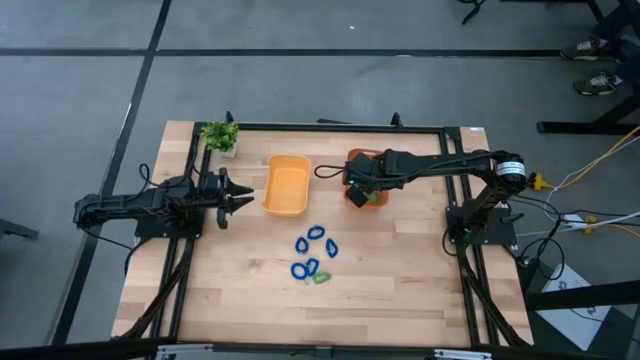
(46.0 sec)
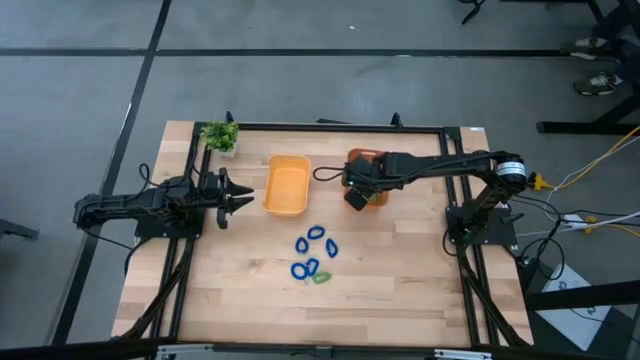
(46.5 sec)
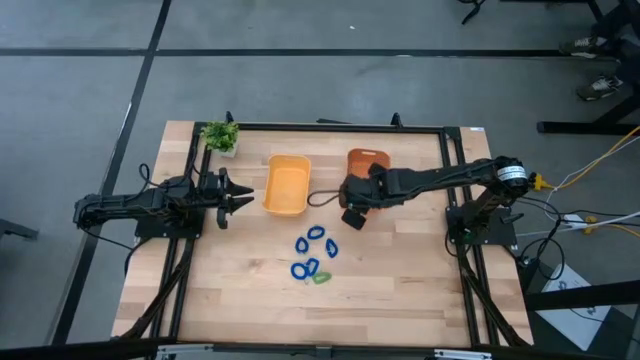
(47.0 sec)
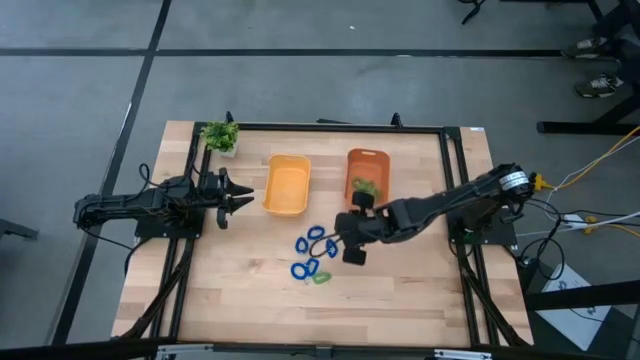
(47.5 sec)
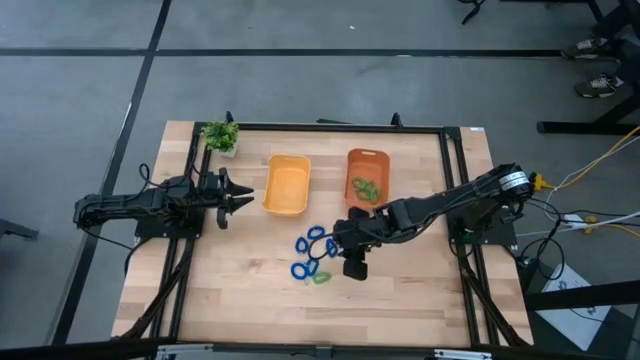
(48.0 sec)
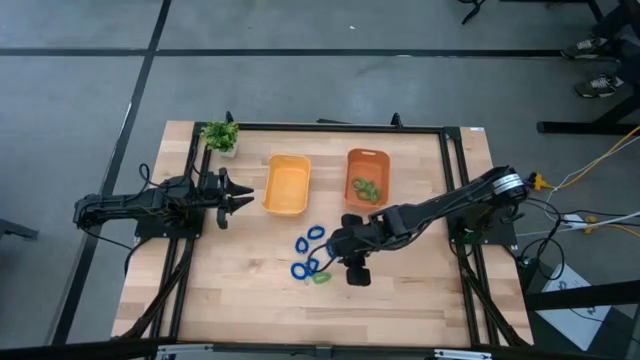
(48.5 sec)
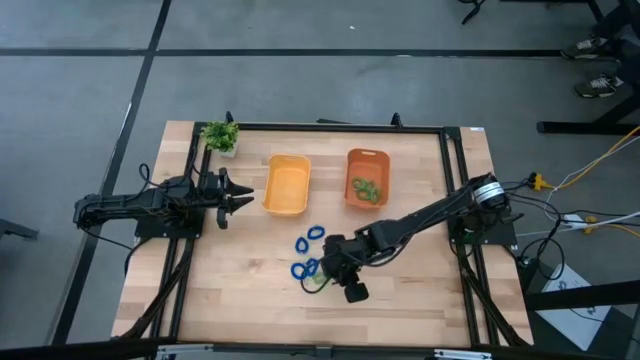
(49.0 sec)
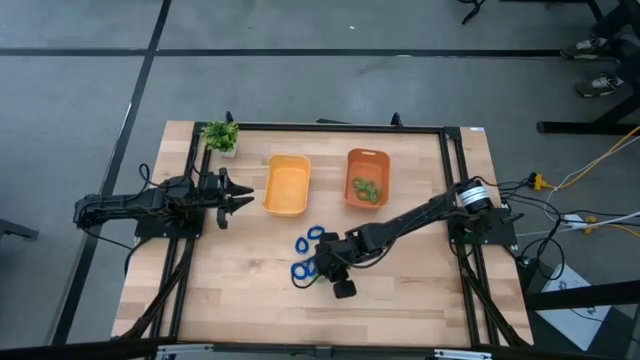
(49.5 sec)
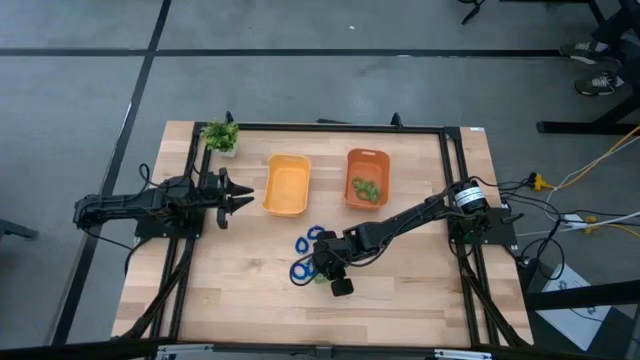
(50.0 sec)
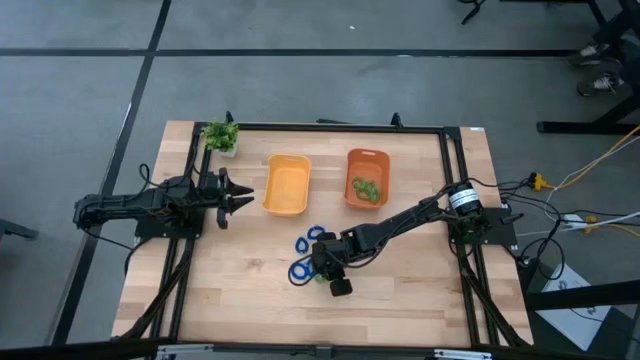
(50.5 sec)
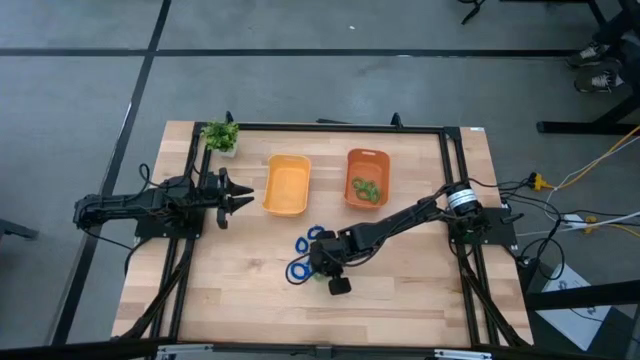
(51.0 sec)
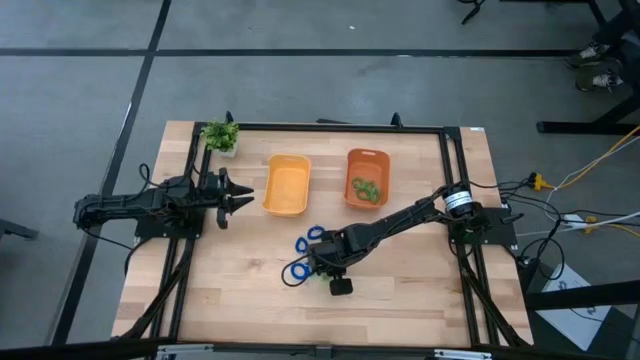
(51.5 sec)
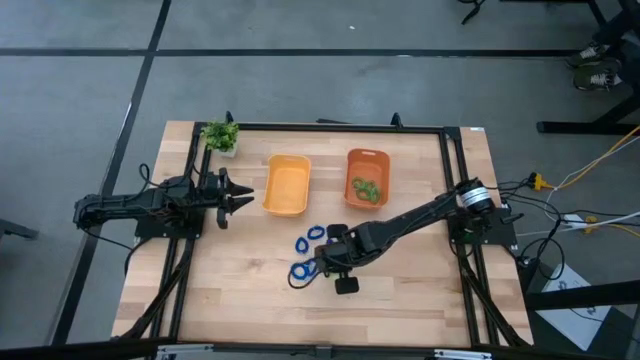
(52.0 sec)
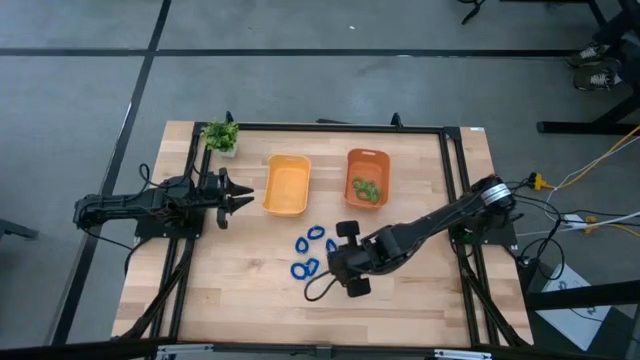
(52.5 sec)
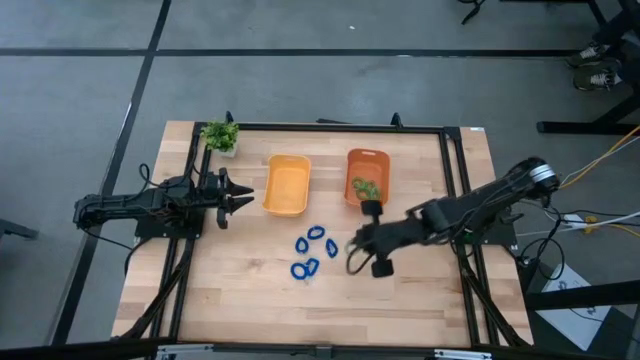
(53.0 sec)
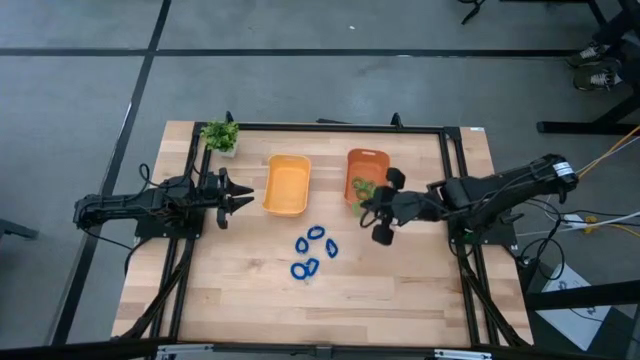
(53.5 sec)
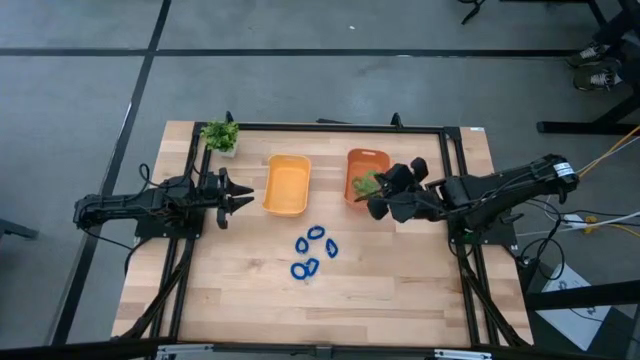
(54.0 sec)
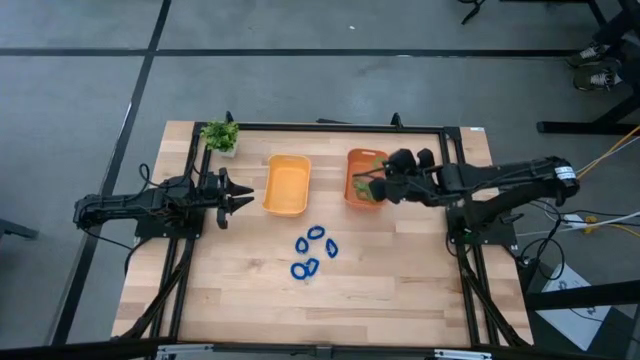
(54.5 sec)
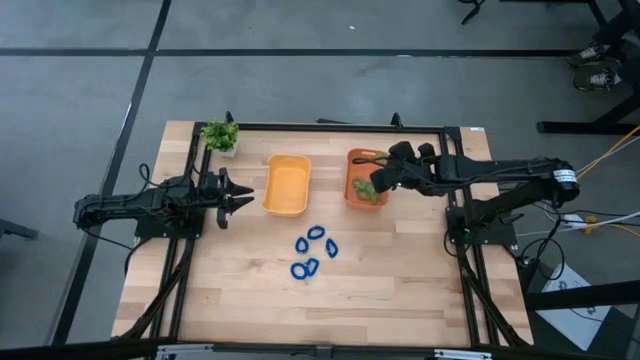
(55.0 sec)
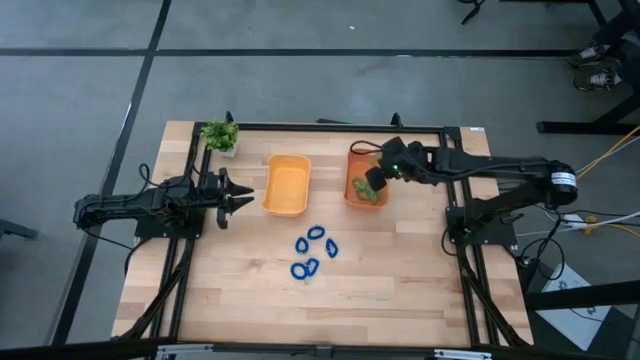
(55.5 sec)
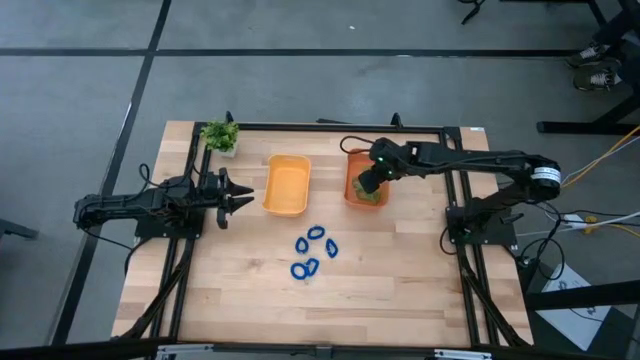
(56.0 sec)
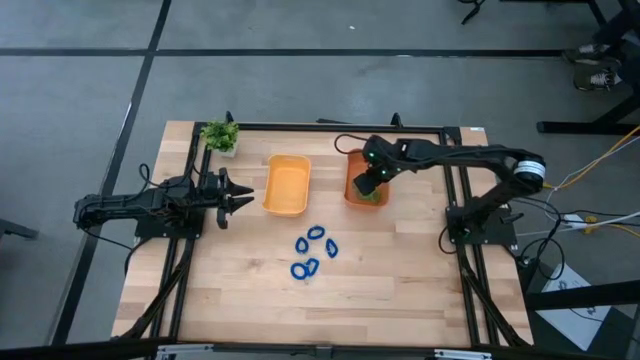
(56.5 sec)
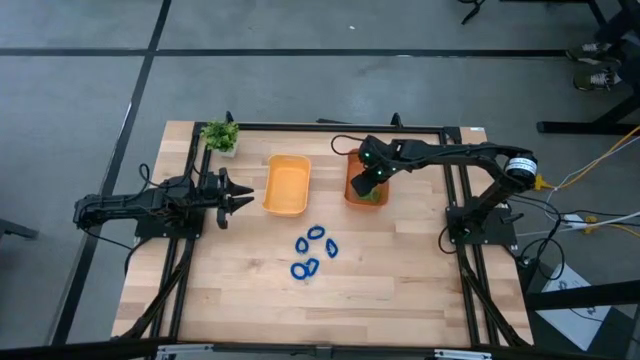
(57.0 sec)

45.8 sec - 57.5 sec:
Task: Sort spring keychains
Put the green spring keychain into the orange bin

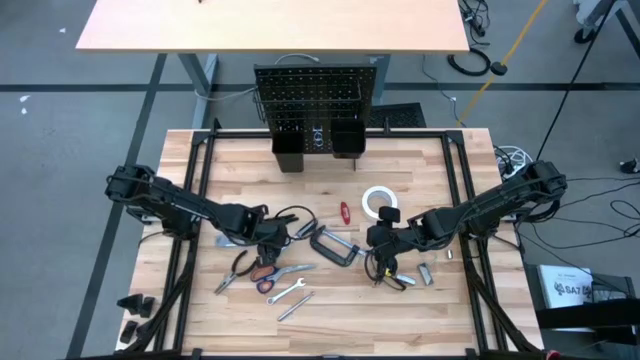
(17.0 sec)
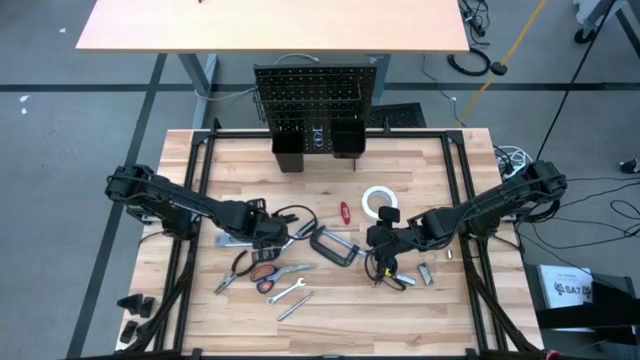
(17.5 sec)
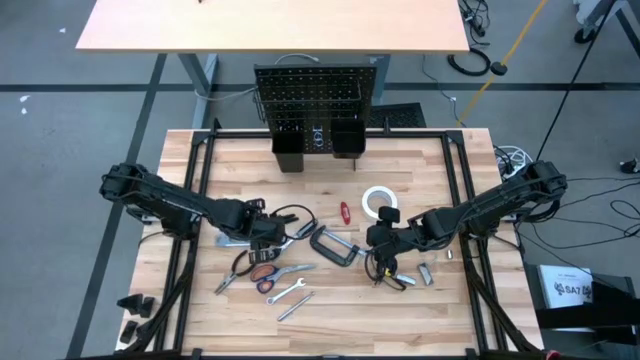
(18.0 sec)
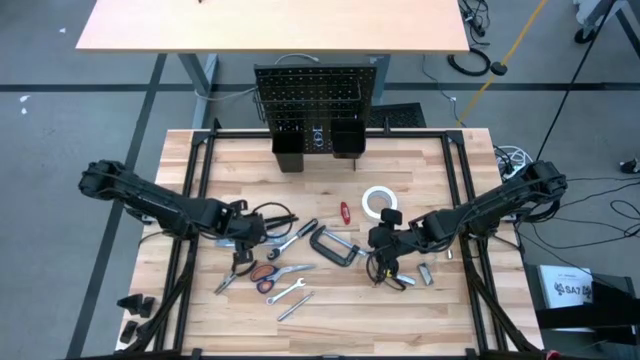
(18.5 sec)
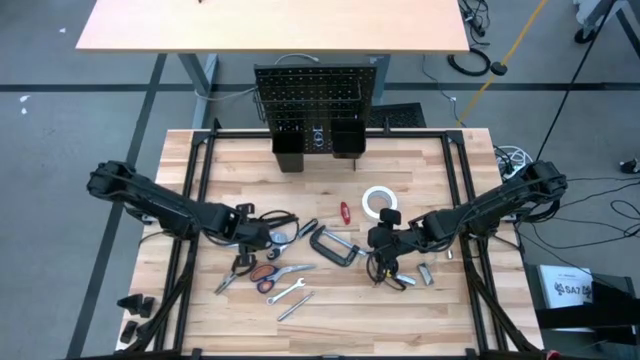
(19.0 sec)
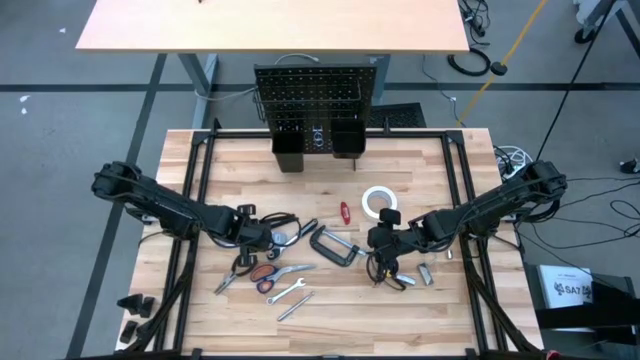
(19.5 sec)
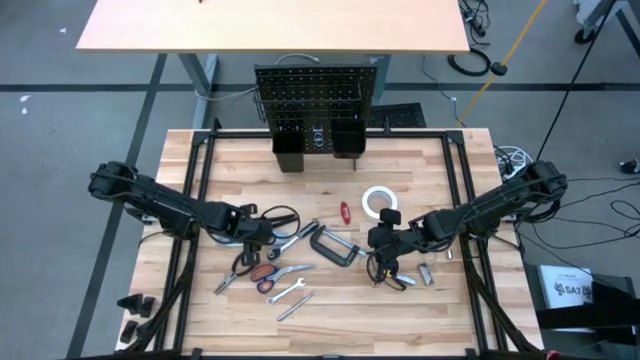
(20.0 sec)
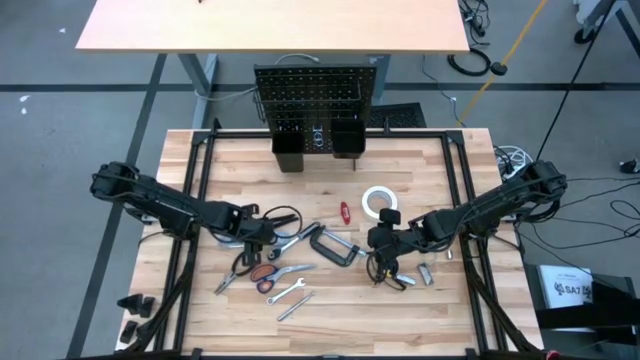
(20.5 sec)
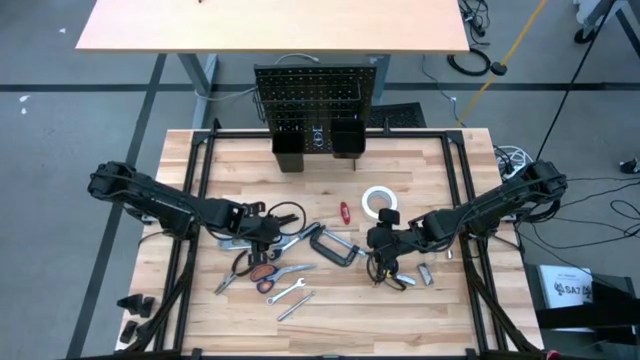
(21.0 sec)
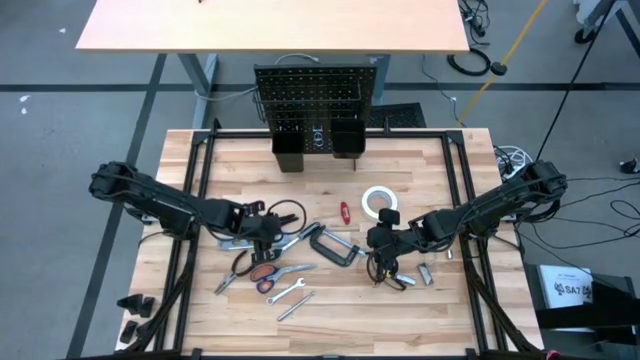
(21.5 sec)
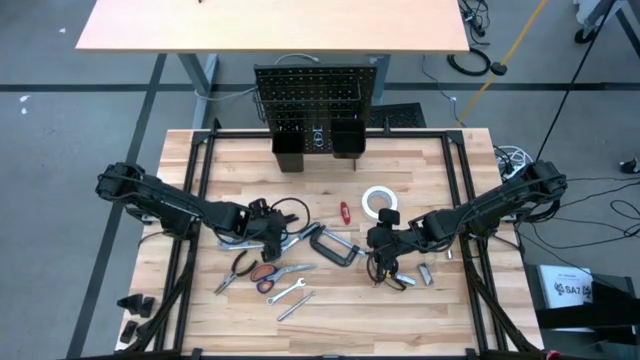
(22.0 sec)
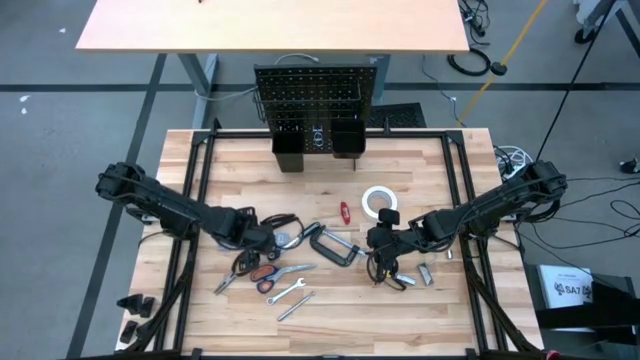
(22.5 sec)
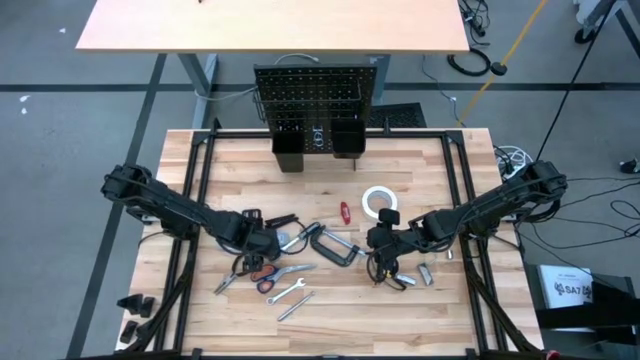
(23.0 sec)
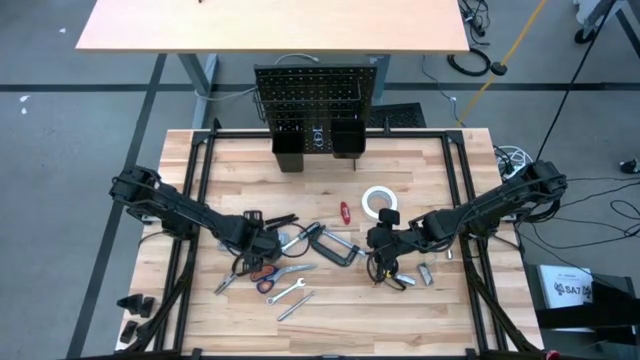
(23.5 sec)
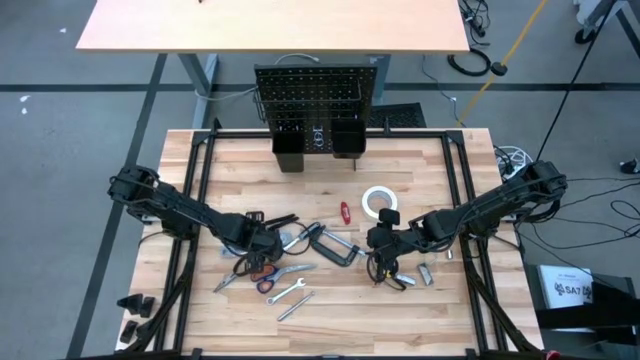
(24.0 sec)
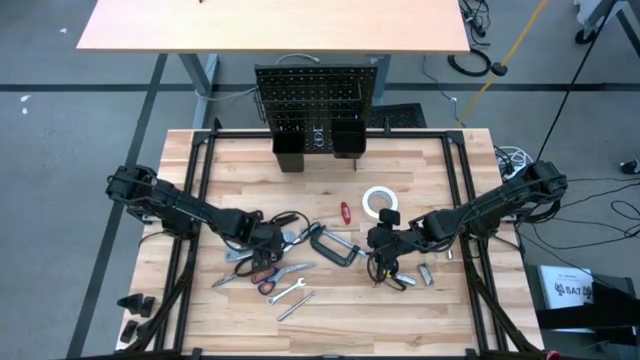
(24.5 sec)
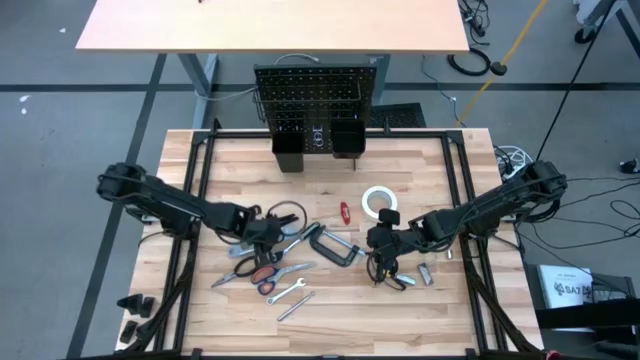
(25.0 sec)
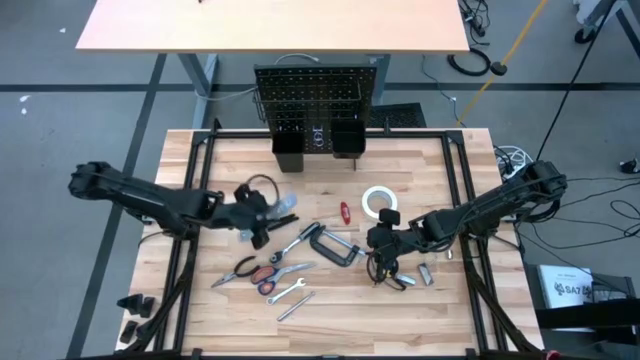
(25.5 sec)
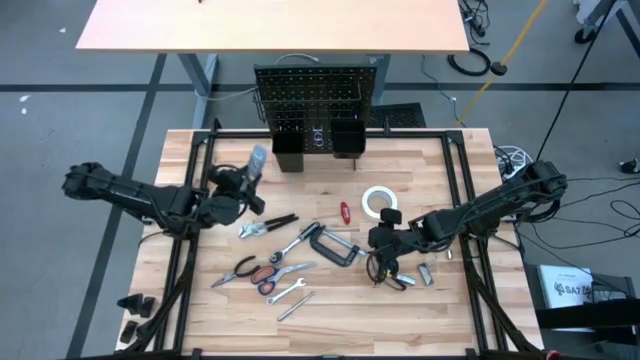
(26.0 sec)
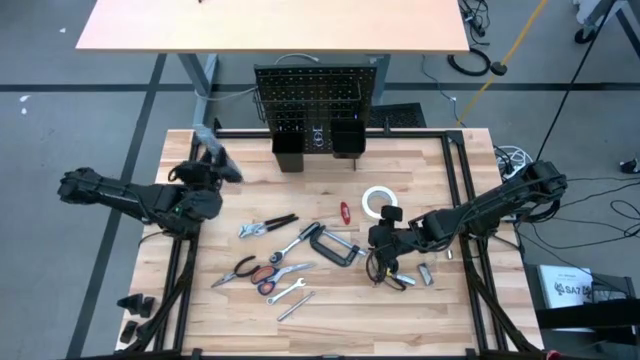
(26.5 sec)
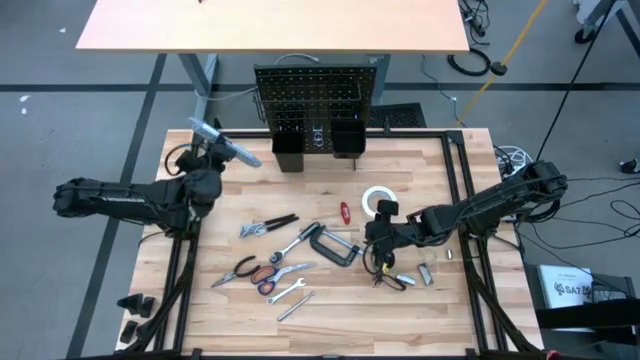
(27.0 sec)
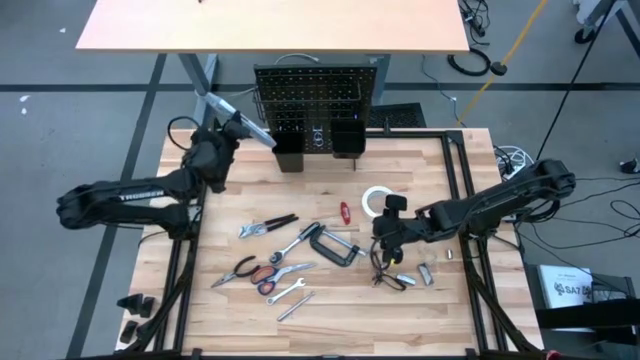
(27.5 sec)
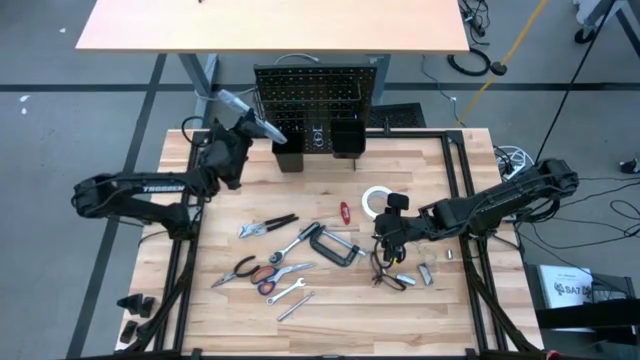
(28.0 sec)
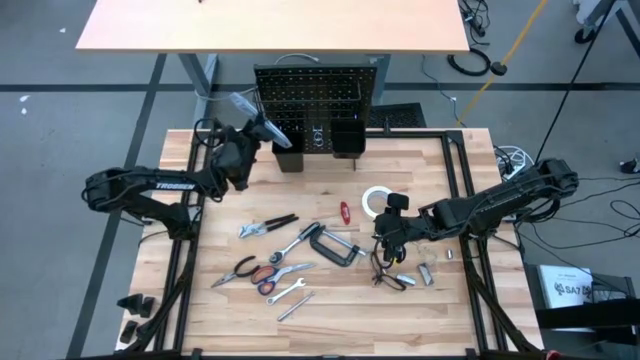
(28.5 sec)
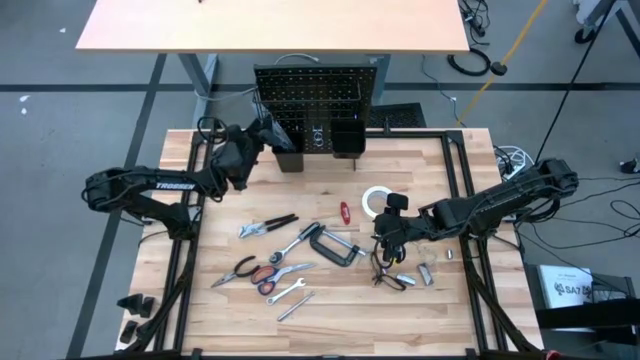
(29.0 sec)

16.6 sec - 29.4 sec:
Task: Hang tools onto peg board
Put the spirit level on the left lower deck of the pegboard
